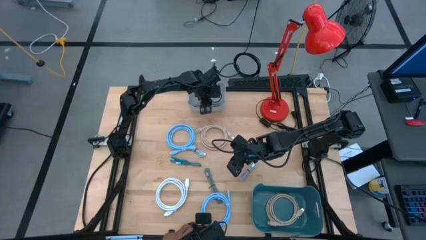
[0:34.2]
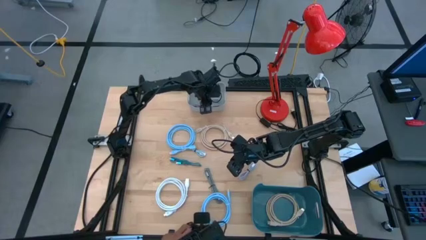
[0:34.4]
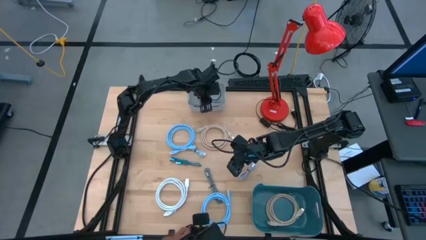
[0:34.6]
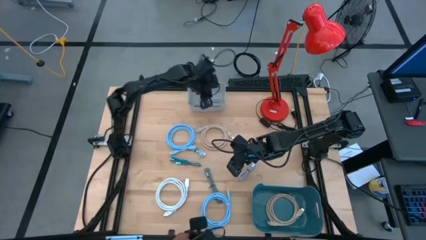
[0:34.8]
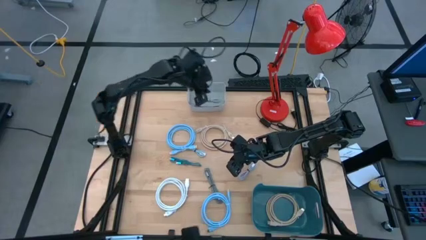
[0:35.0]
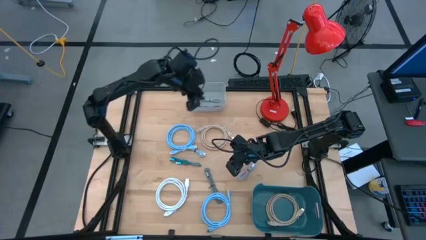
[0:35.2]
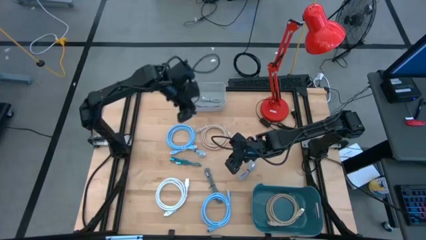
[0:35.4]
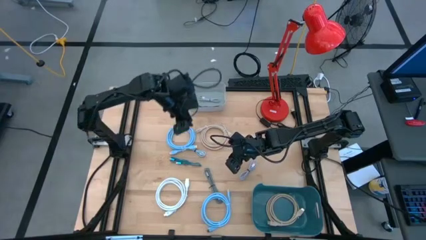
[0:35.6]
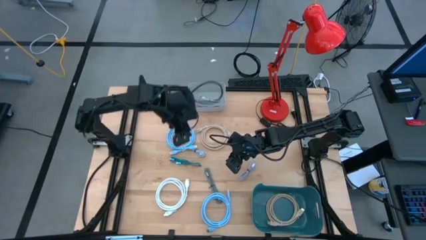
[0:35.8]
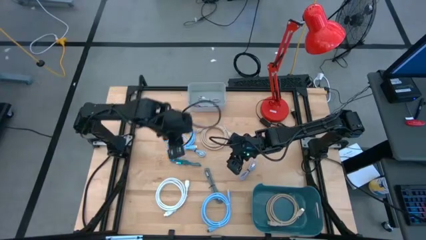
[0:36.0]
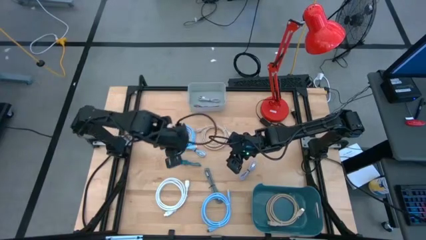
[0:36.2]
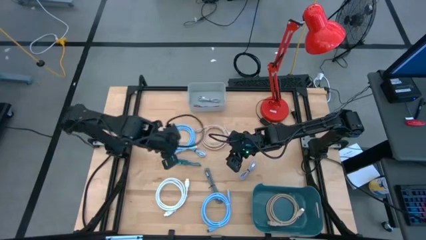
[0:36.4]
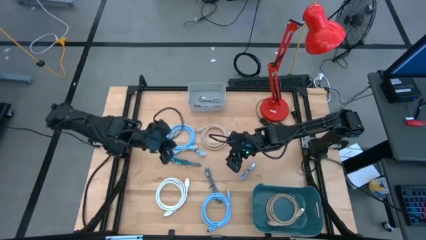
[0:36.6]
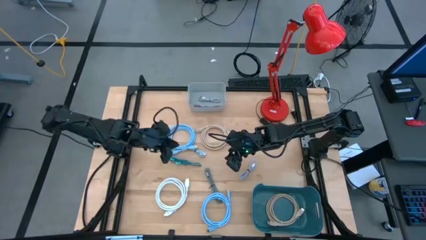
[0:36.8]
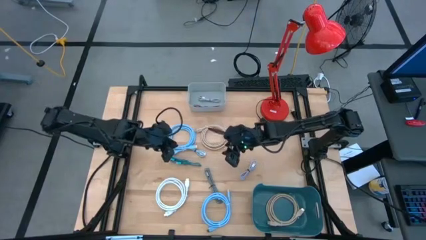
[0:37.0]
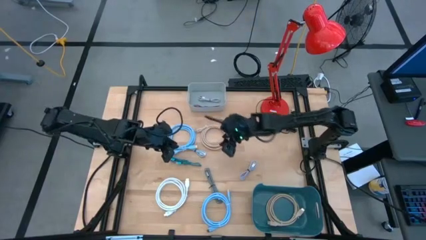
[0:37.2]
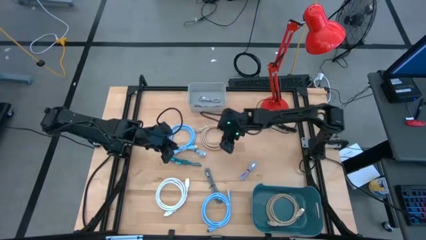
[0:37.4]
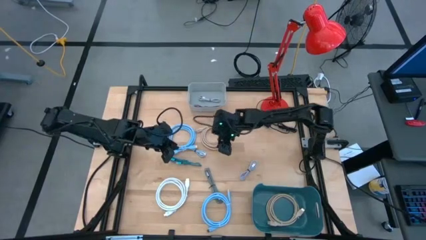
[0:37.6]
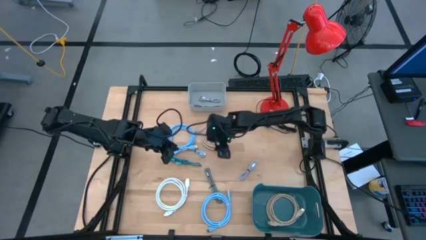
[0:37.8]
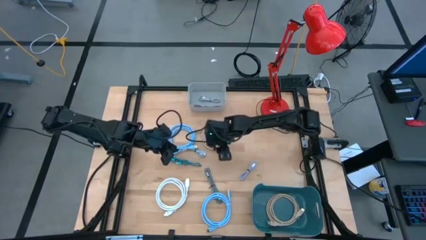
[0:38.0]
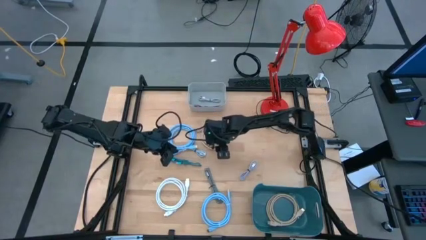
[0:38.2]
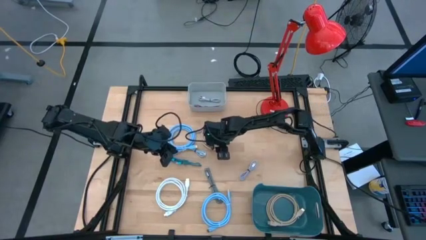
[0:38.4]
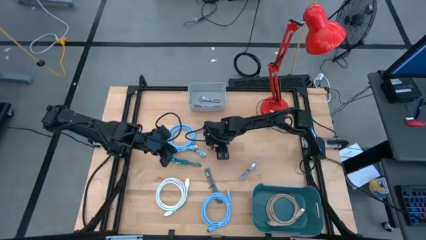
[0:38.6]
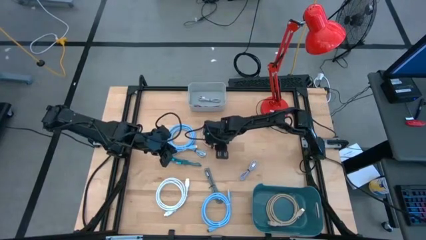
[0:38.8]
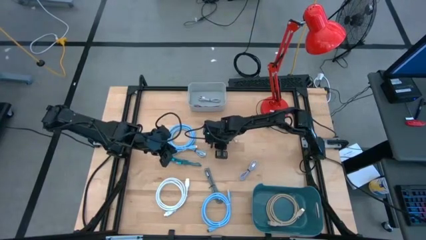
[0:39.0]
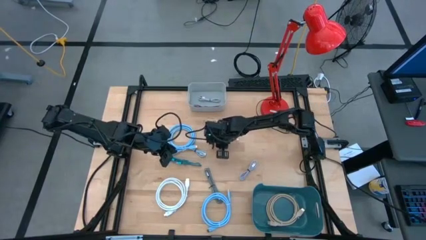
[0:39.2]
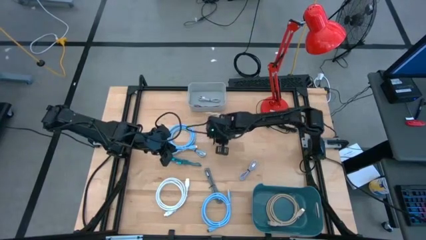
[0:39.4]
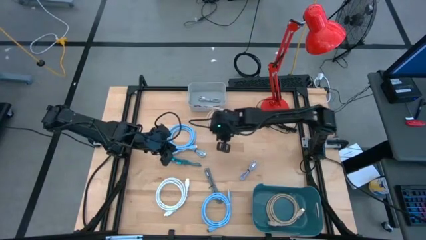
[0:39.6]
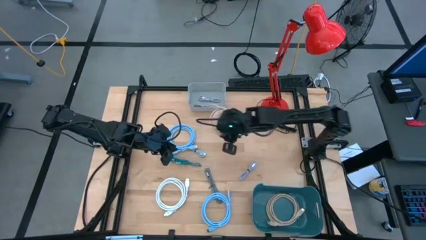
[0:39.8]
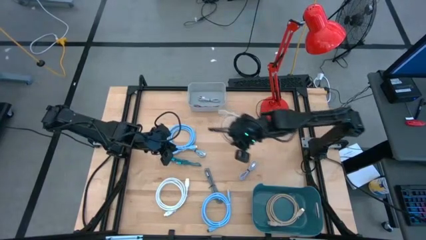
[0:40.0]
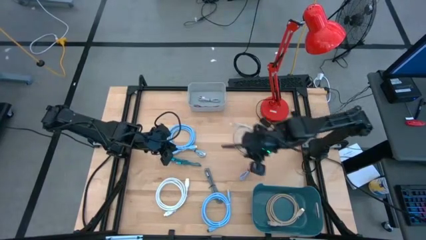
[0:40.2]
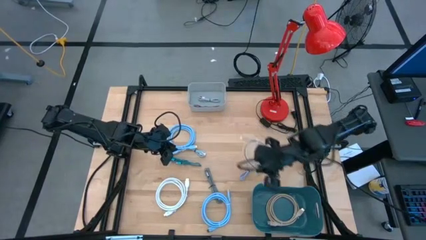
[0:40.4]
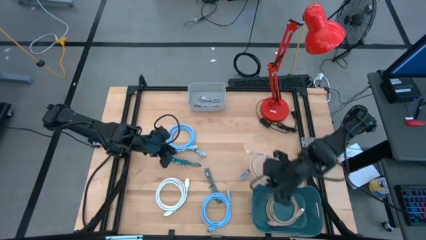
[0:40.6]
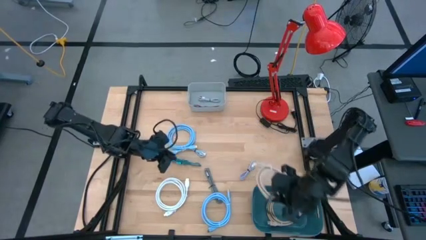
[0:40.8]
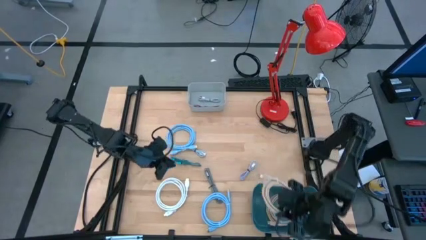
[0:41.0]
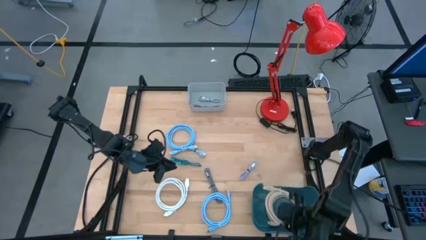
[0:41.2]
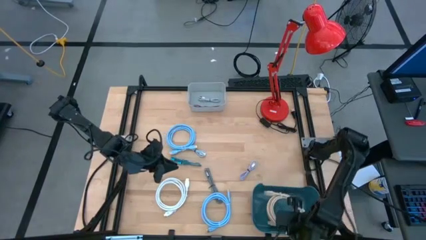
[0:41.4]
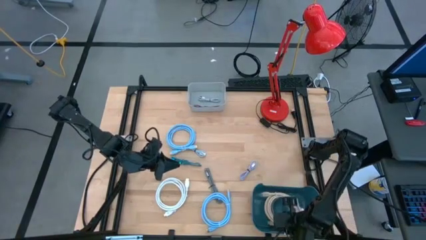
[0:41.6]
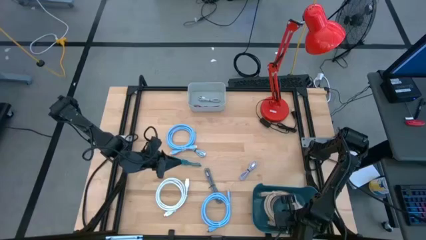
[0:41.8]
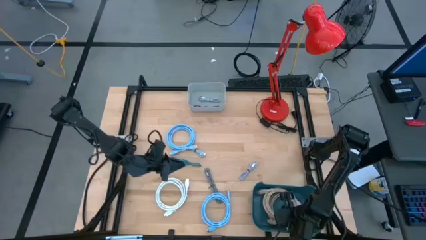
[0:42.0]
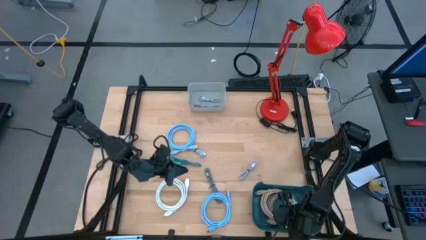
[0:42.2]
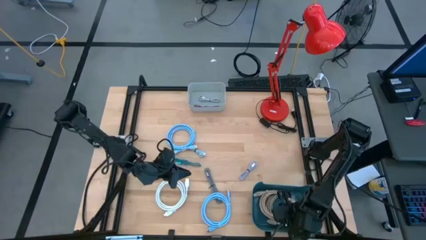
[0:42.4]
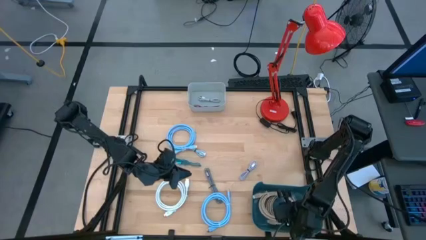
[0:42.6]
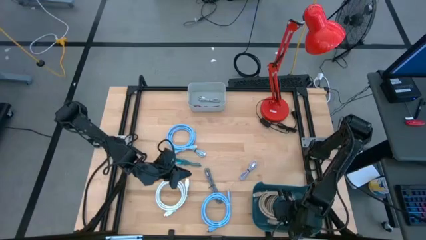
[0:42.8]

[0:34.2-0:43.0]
Task: Pick & Place USB Port
Put the brown hdmi cable into the blue bin

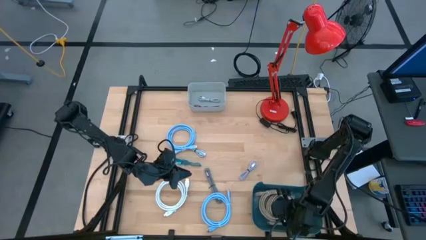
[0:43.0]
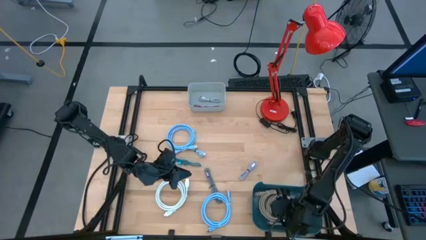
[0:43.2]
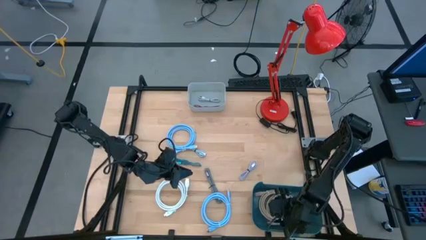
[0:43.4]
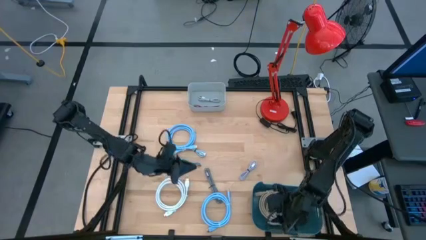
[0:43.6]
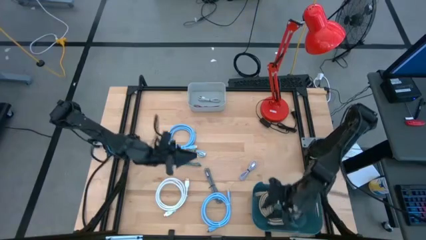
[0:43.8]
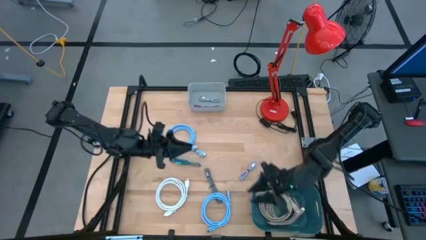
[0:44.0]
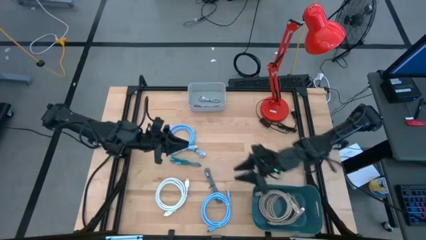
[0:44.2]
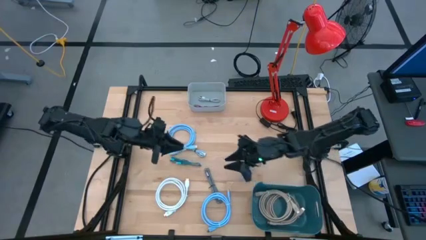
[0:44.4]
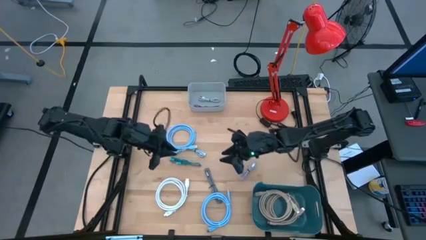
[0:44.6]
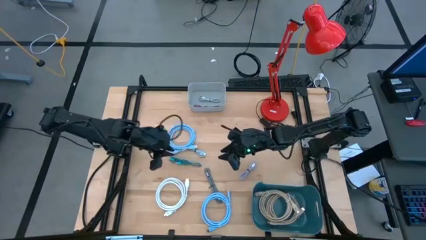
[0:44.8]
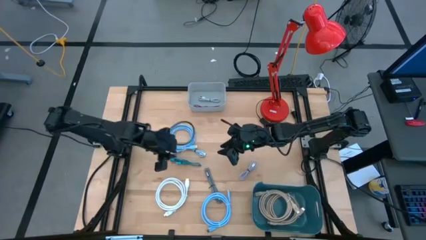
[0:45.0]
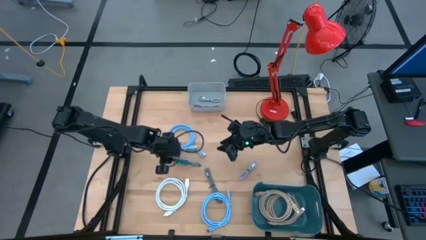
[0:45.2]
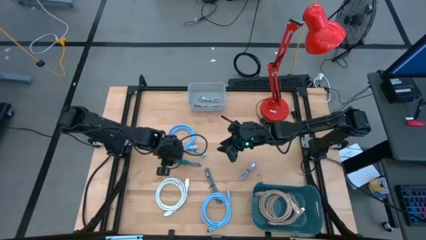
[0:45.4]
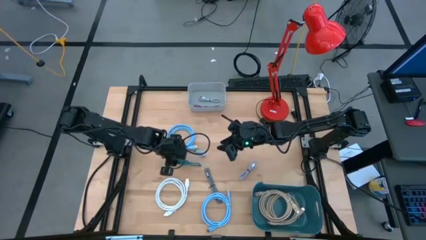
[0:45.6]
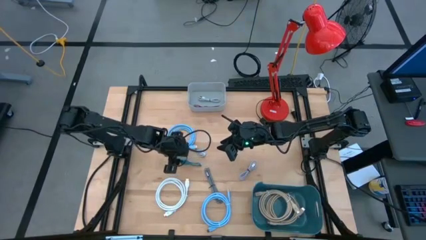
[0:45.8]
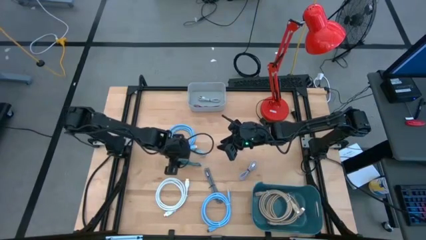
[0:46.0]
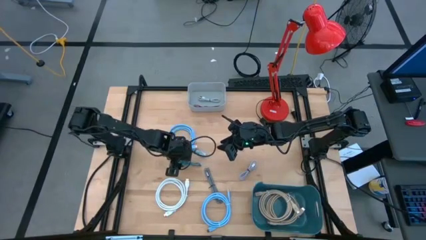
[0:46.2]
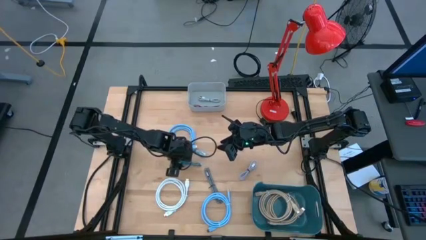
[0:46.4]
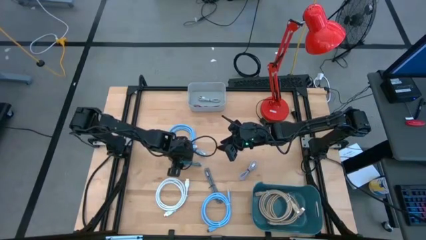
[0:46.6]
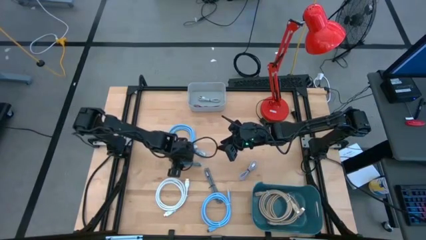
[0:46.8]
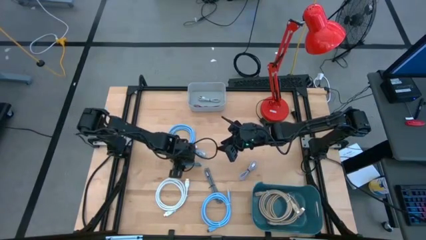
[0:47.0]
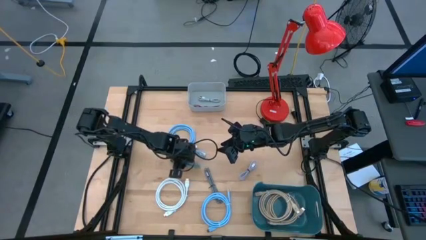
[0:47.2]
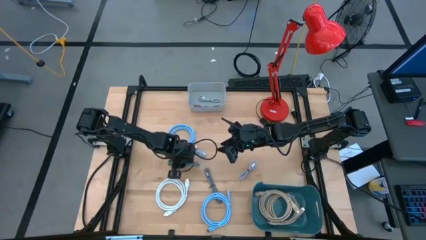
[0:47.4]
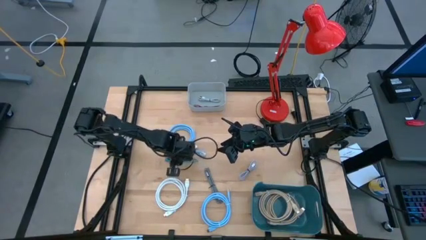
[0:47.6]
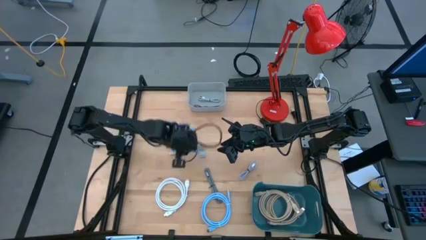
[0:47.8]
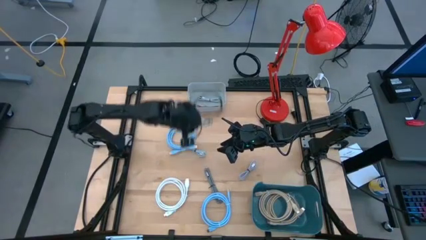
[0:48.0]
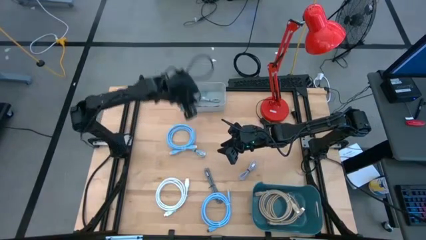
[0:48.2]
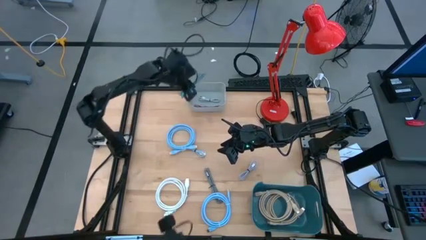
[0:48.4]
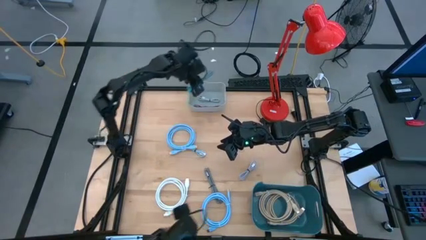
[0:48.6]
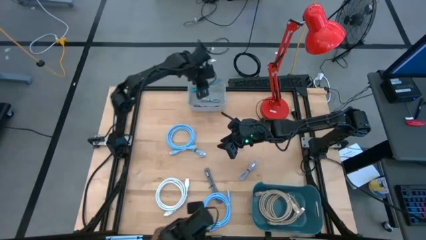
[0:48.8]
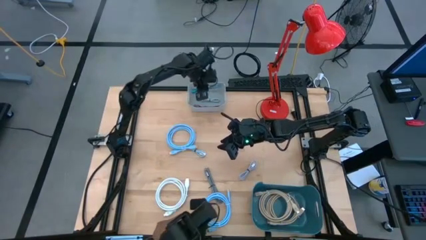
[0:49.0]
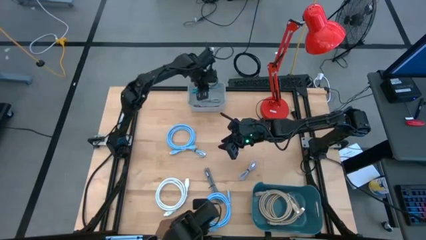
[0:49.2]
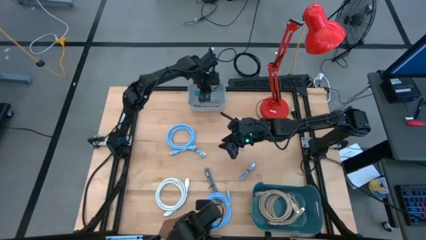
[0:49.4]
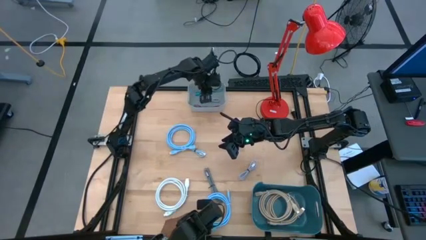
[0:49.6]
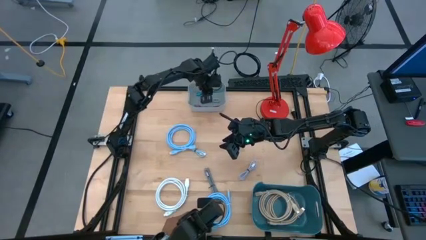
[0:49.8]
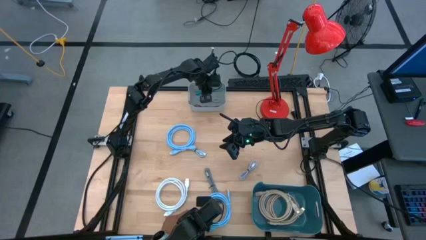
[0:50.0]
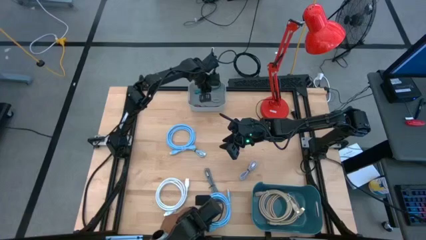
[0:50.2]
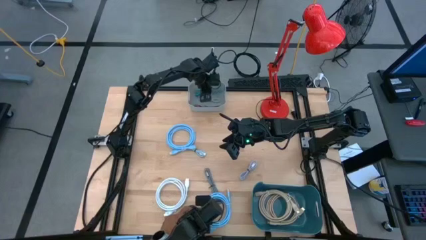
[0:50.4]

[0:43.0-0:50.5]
Put the blue usb cable into the gray bin
